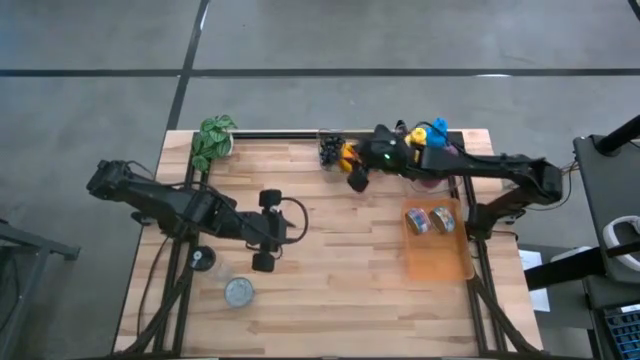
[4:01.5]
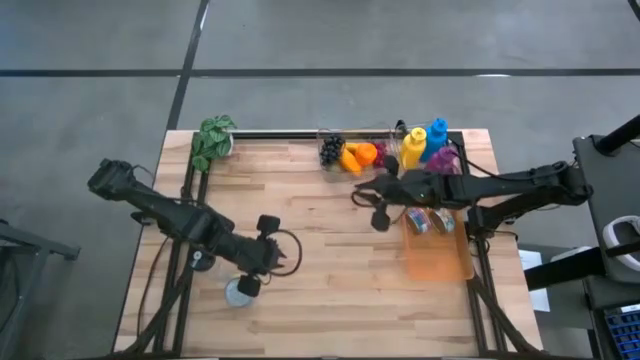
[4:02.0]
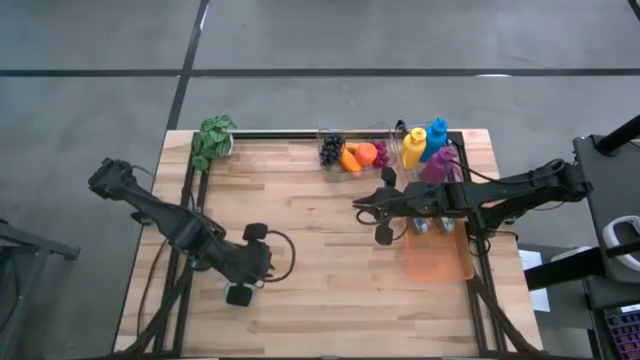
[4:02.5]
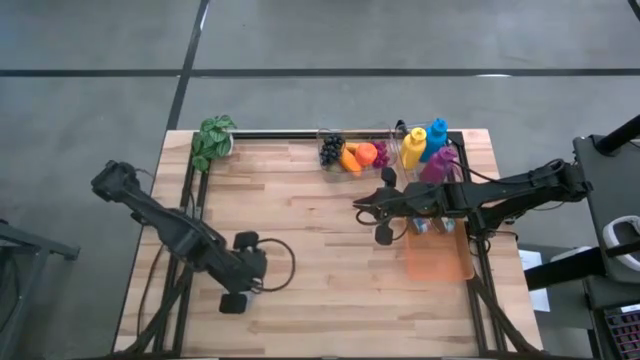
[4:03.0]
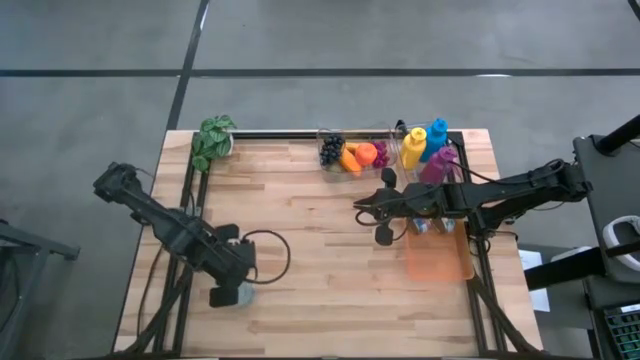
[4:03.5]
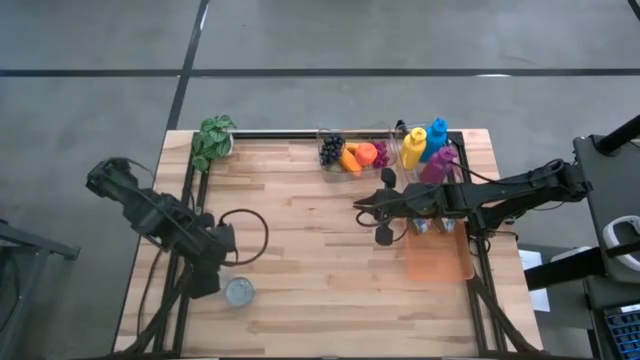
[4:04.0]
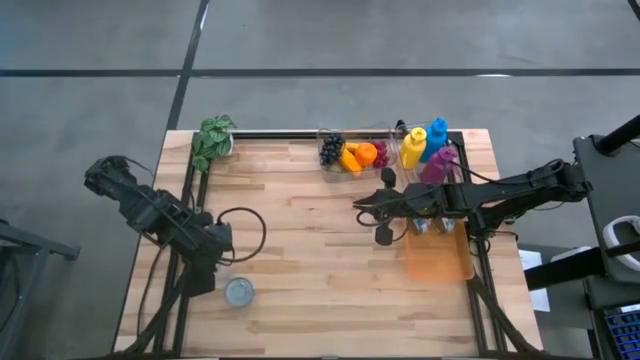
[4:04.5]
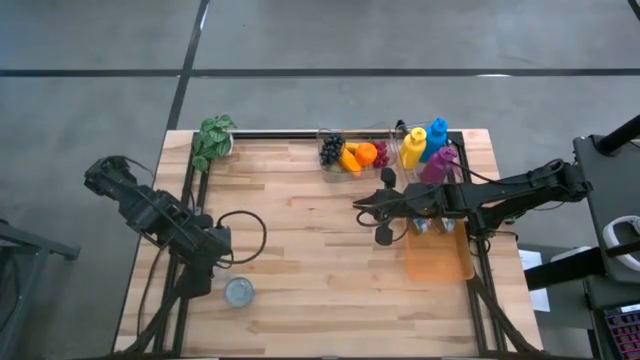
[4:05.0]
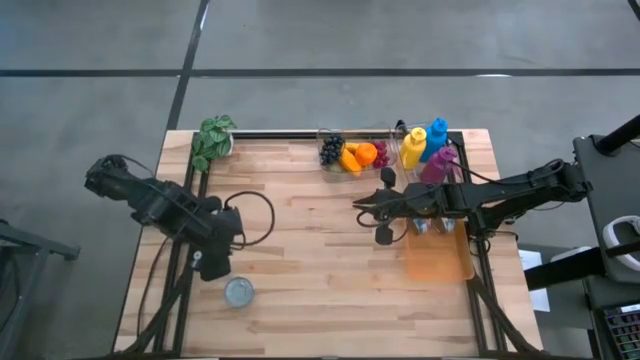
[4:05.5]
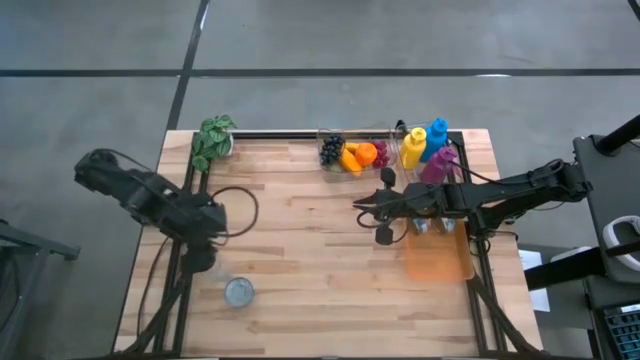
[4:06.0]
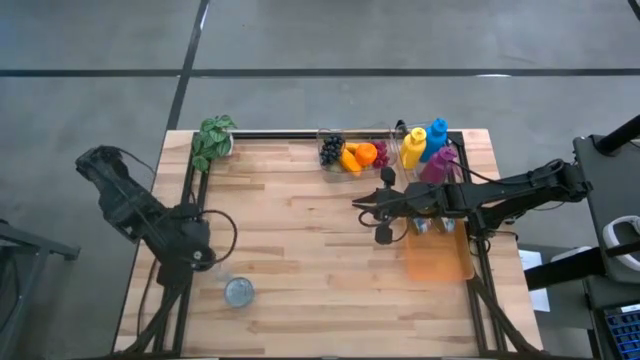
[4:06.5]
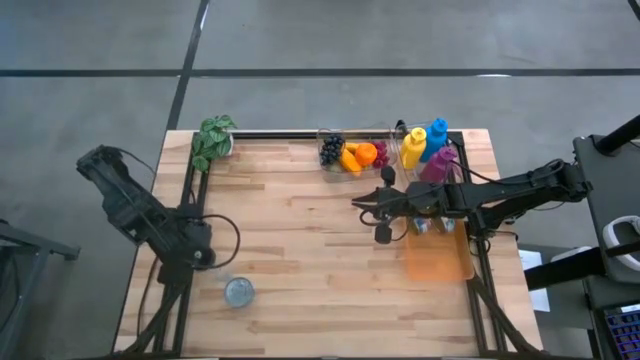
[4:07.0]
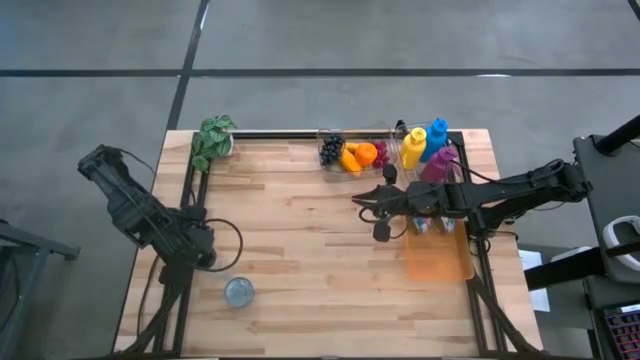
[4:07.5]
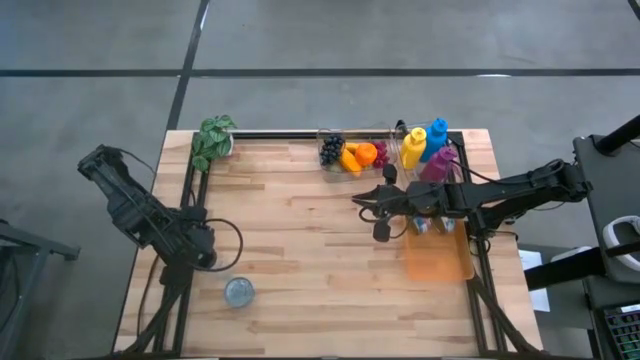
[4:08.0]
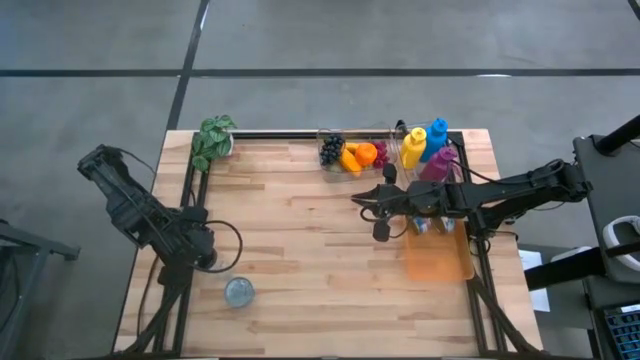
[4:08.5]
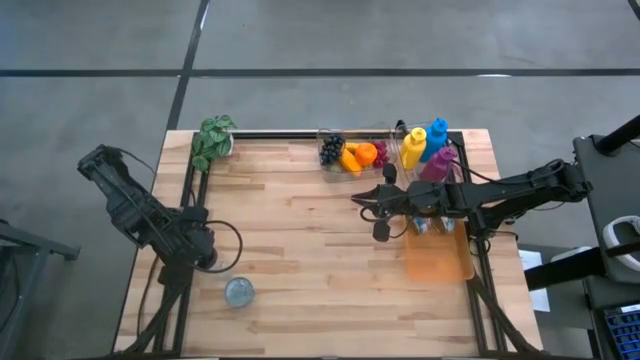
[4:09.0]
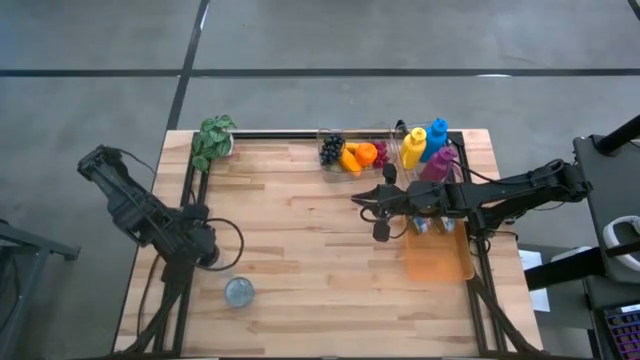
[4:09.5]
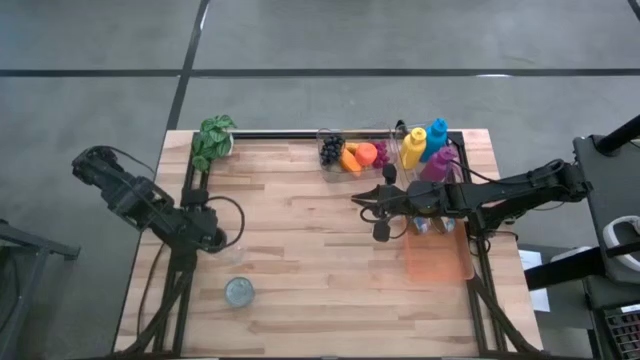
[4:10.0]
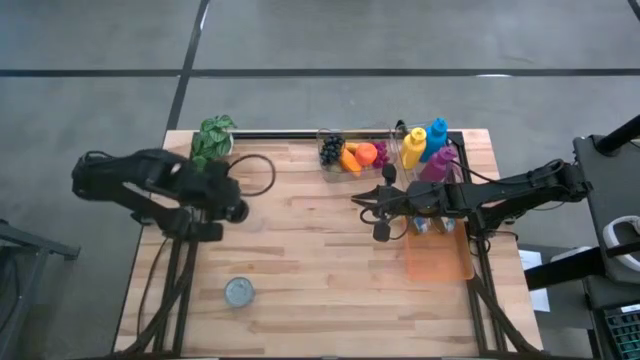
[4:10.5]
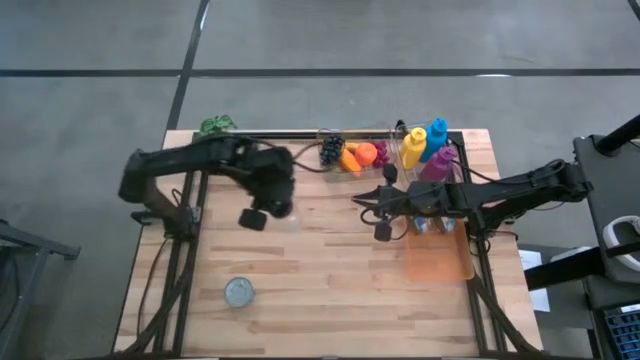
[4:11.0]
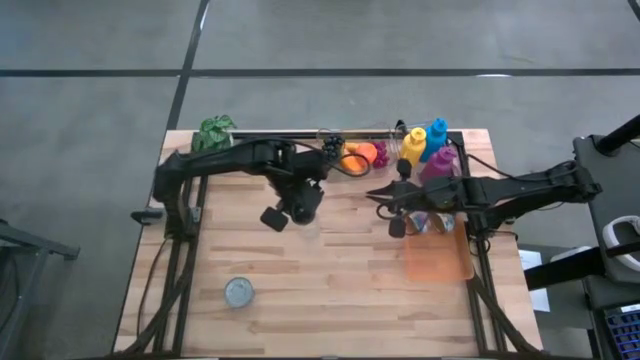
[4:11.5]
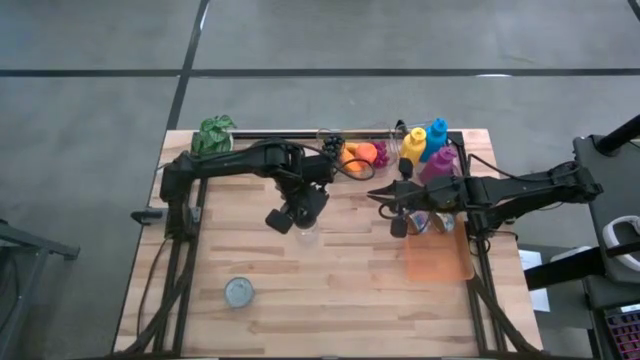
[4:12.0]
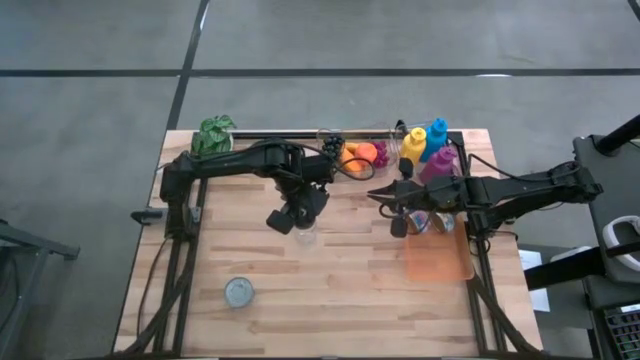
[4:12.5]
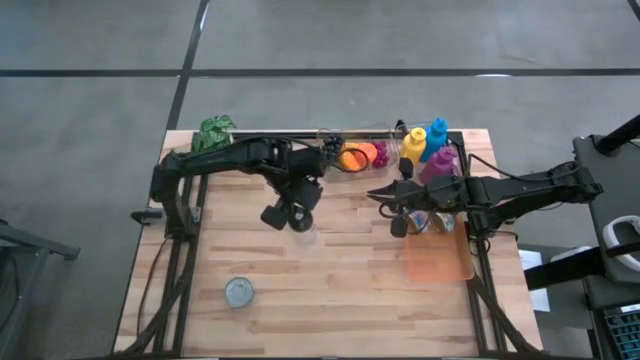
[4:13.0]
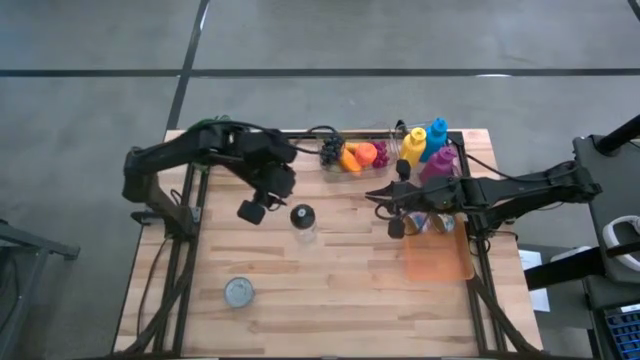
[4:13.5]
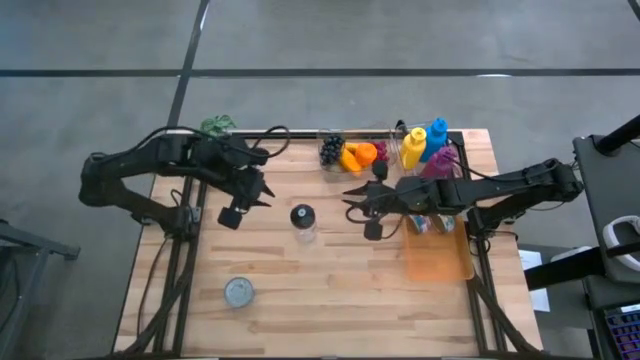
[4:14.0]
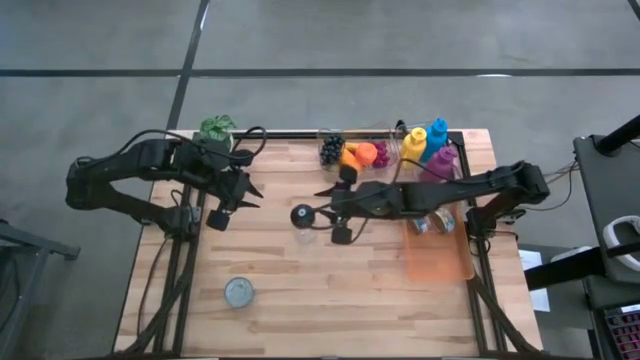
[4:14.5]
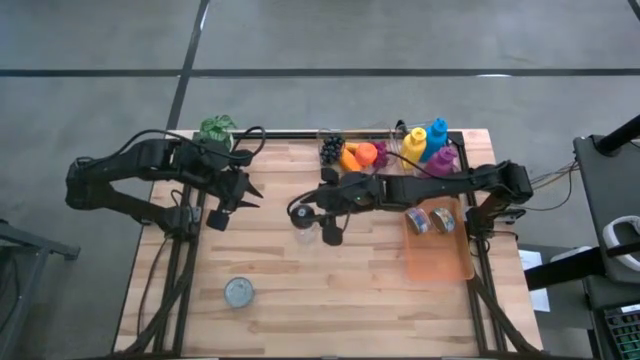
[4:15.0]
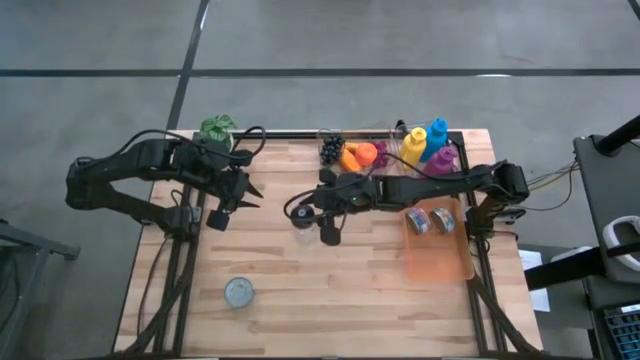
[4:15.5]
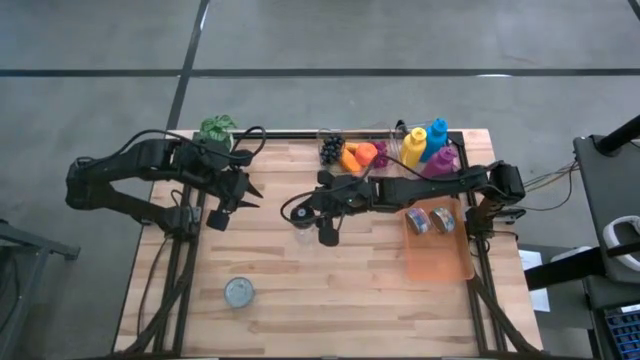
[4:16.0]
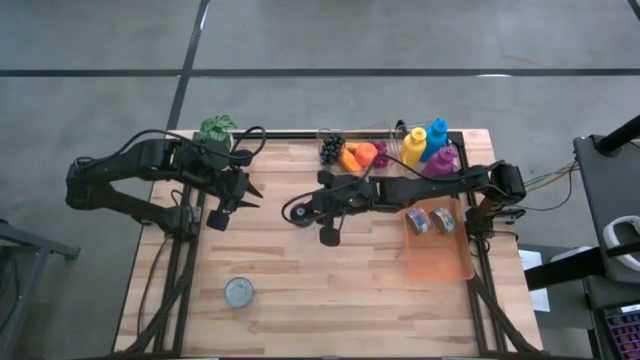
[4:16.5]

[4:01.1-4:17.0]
Task: Pick & Place Food Item
Put the black water bottle into the right transparent bin
